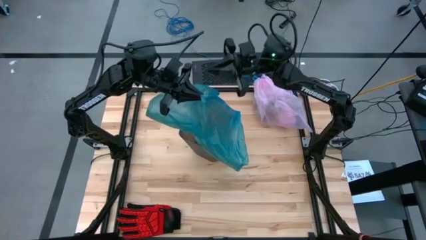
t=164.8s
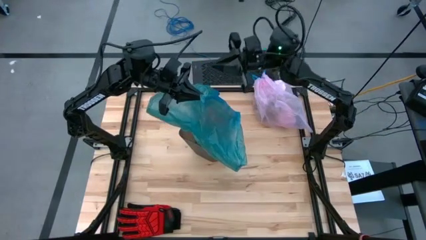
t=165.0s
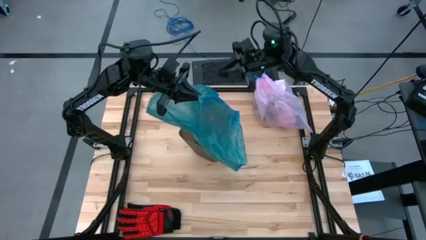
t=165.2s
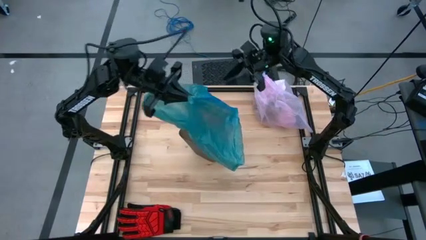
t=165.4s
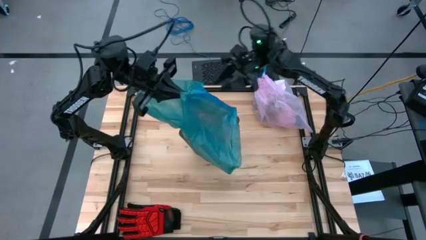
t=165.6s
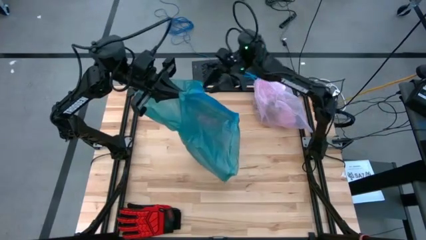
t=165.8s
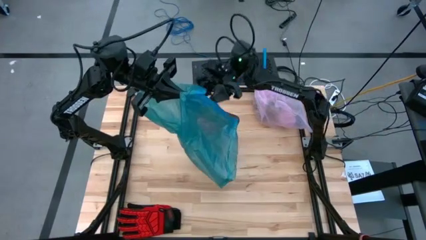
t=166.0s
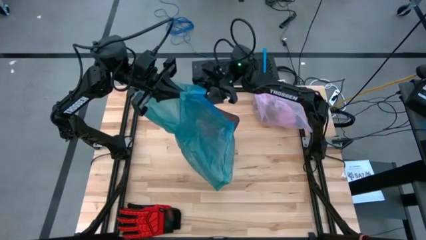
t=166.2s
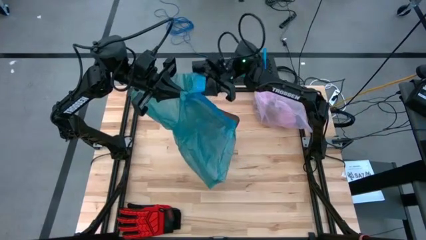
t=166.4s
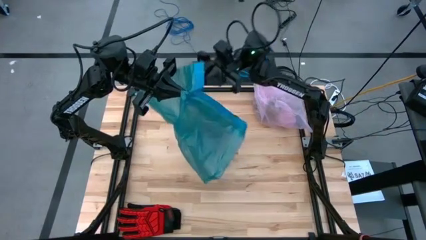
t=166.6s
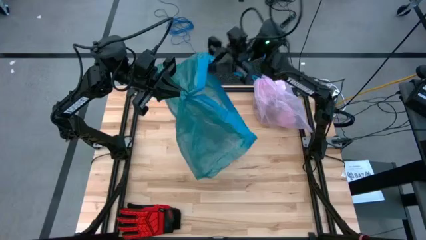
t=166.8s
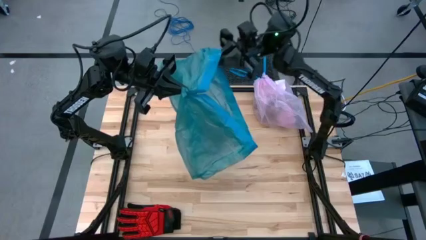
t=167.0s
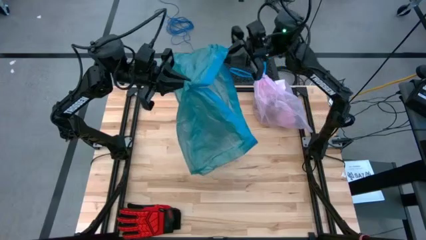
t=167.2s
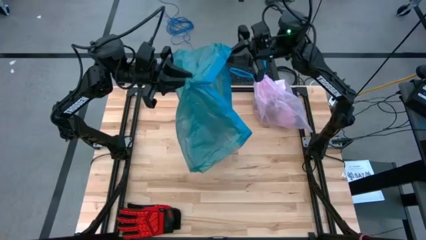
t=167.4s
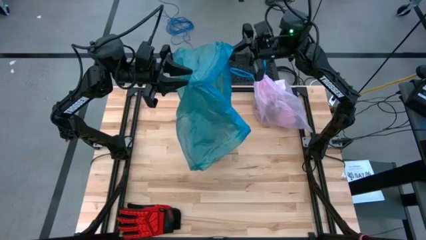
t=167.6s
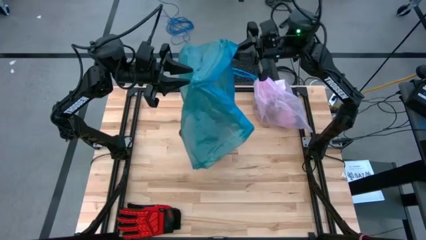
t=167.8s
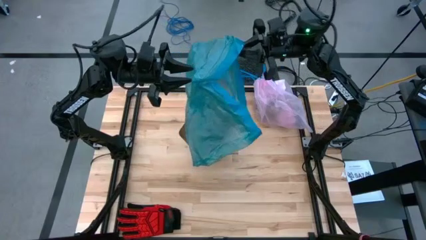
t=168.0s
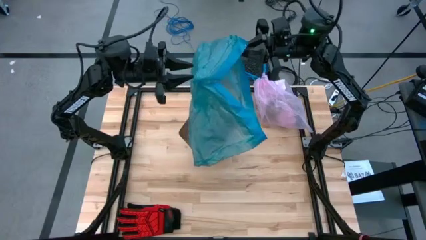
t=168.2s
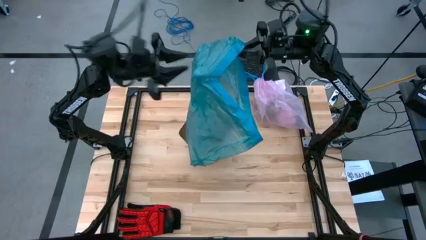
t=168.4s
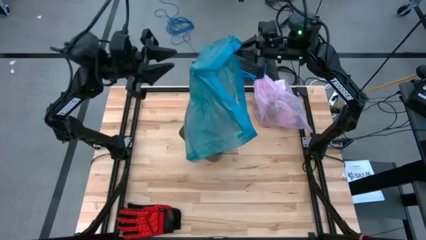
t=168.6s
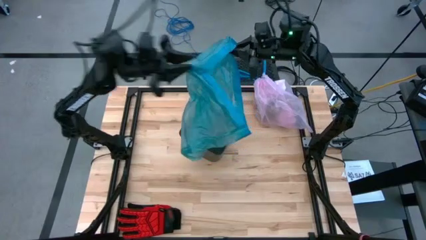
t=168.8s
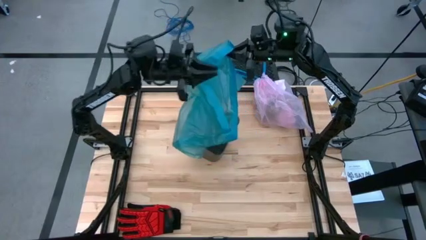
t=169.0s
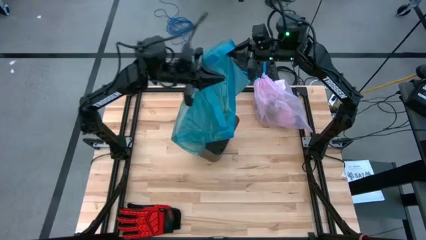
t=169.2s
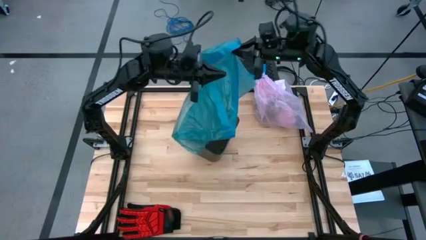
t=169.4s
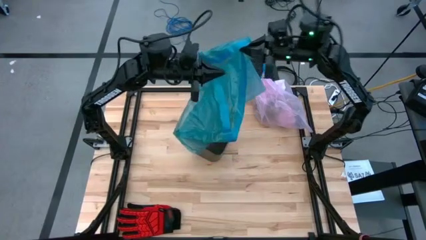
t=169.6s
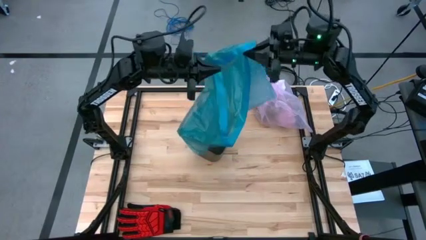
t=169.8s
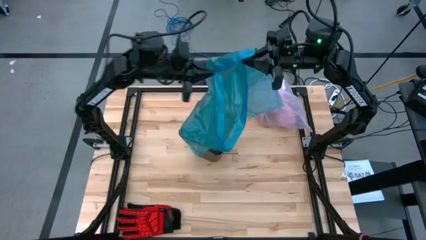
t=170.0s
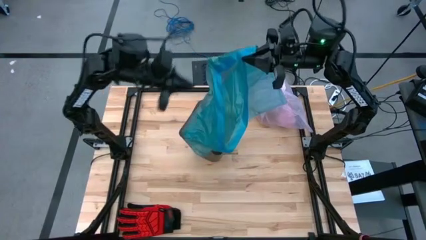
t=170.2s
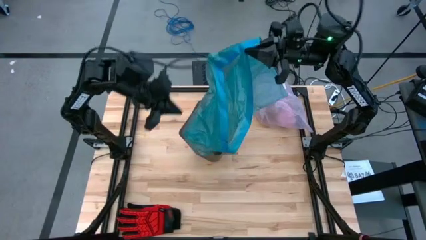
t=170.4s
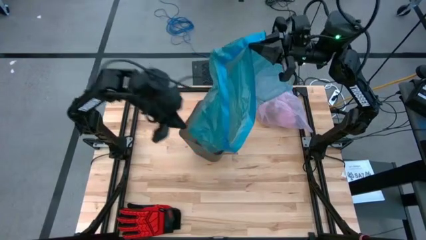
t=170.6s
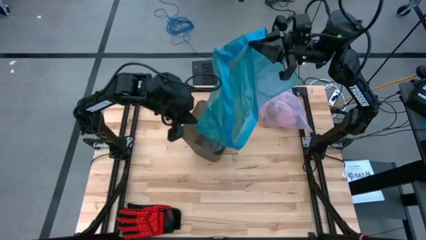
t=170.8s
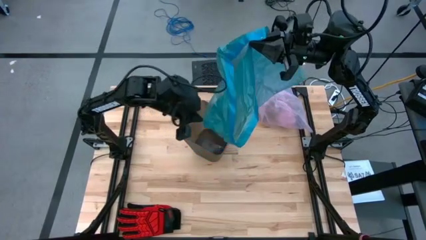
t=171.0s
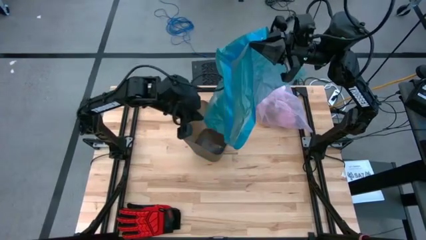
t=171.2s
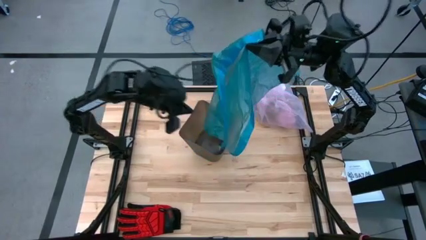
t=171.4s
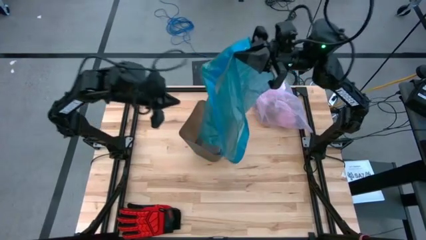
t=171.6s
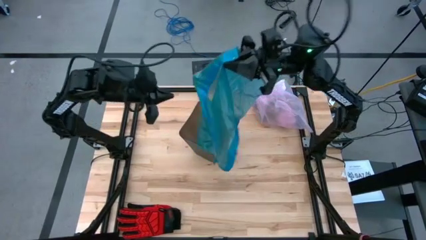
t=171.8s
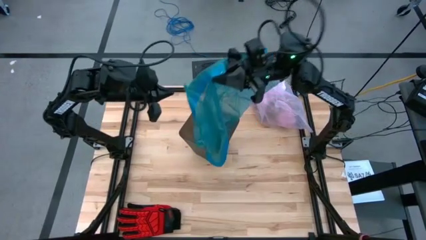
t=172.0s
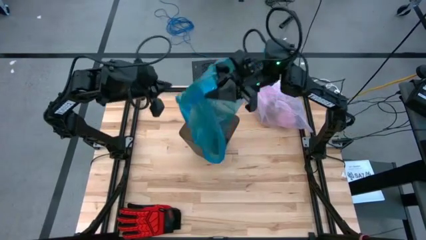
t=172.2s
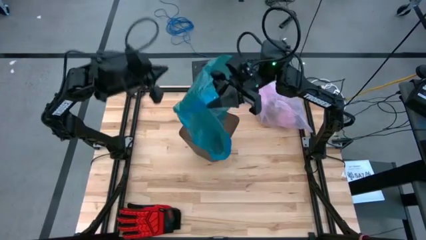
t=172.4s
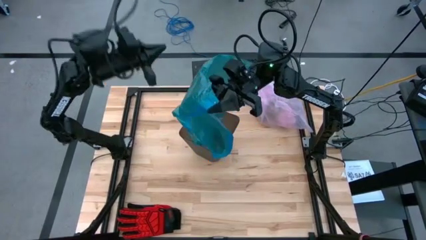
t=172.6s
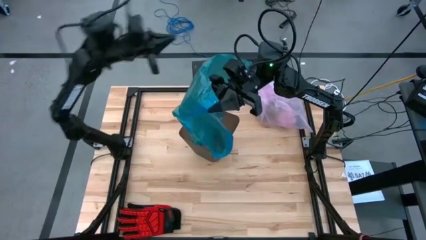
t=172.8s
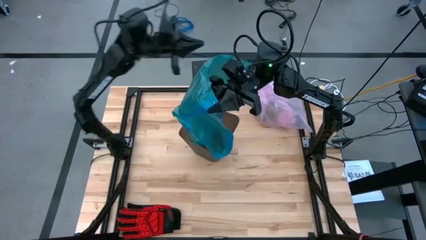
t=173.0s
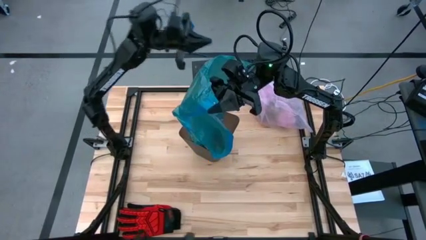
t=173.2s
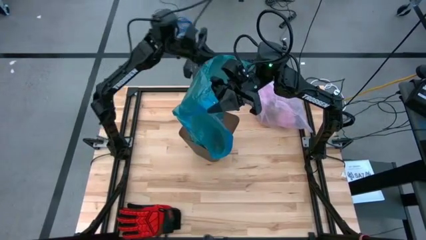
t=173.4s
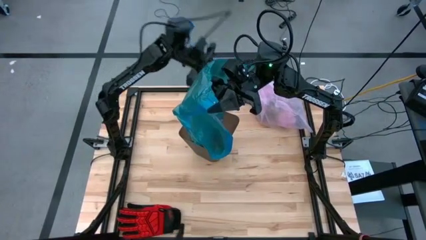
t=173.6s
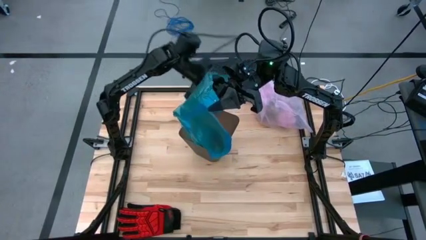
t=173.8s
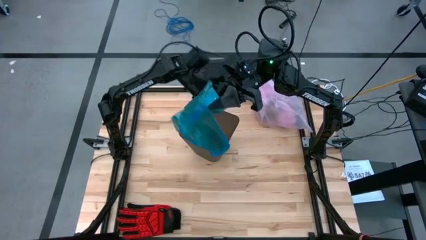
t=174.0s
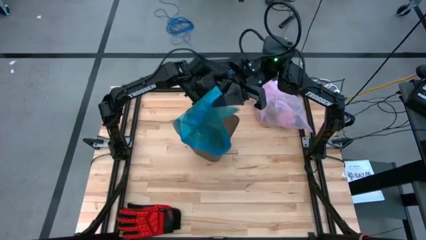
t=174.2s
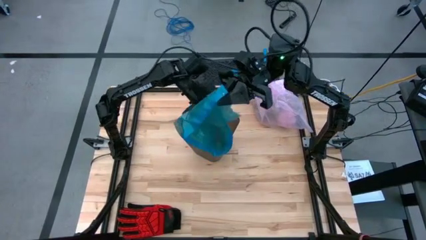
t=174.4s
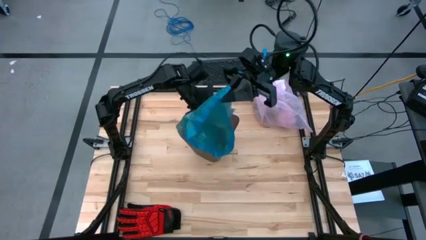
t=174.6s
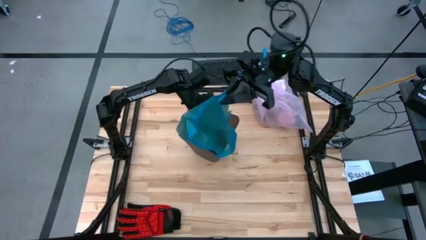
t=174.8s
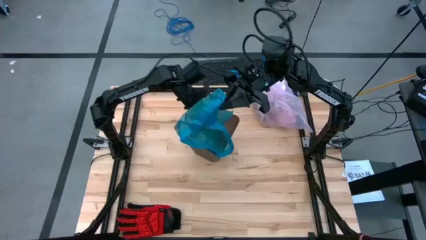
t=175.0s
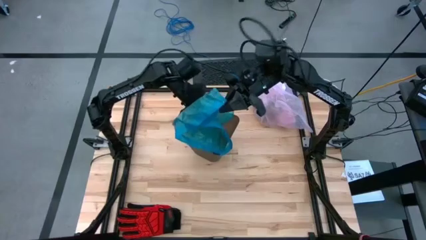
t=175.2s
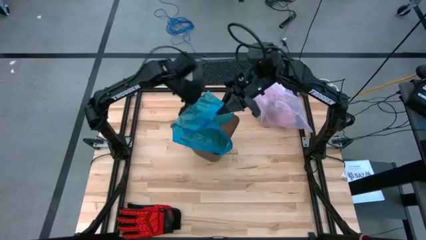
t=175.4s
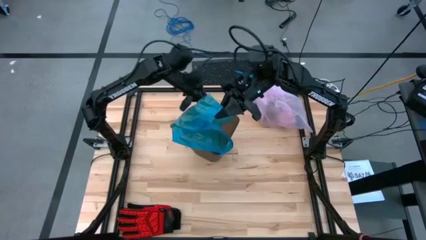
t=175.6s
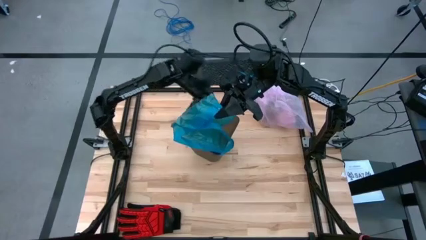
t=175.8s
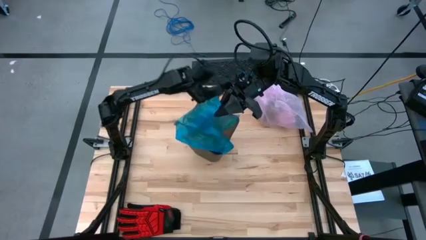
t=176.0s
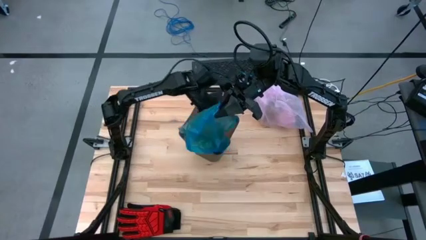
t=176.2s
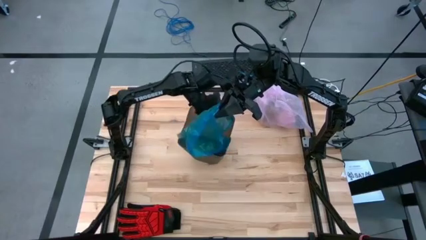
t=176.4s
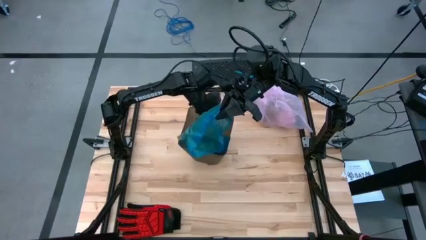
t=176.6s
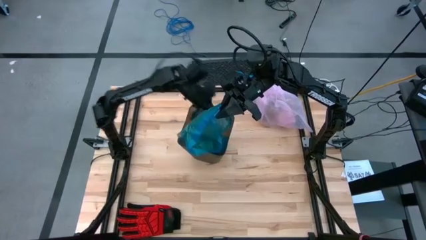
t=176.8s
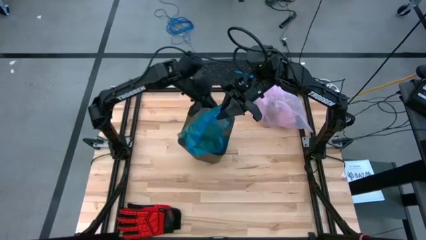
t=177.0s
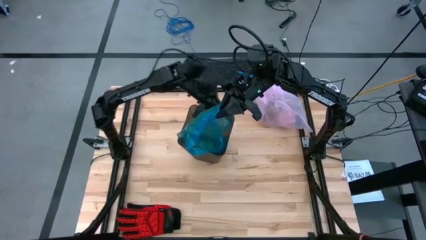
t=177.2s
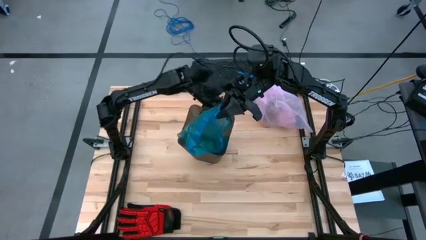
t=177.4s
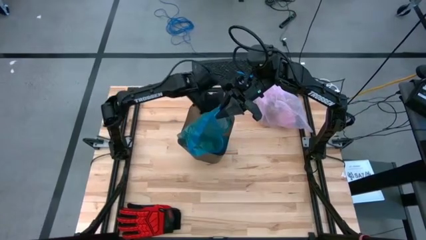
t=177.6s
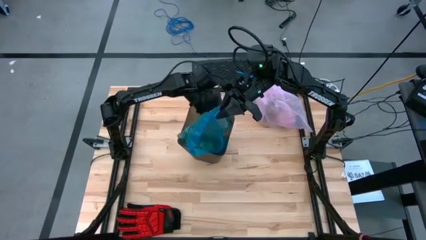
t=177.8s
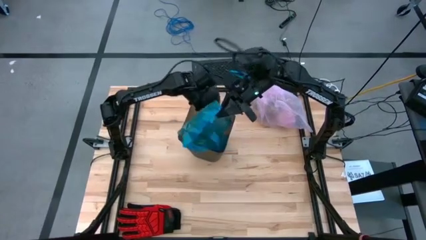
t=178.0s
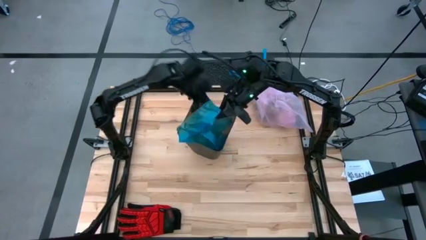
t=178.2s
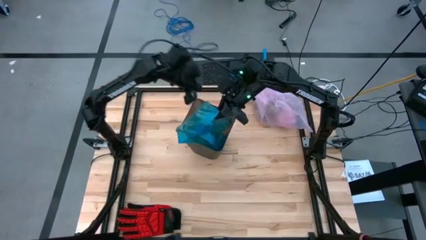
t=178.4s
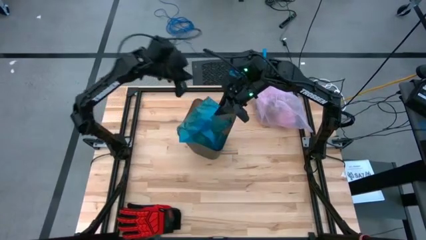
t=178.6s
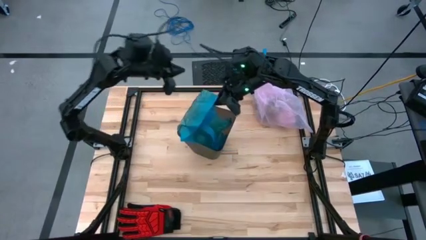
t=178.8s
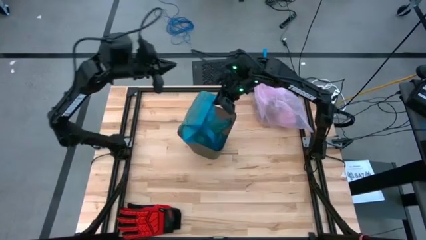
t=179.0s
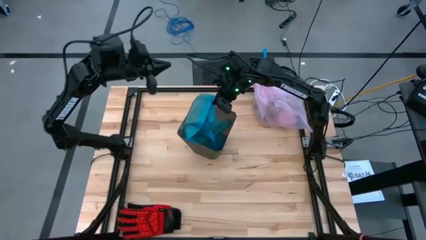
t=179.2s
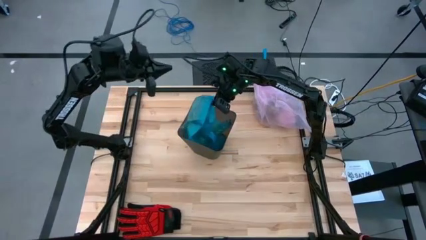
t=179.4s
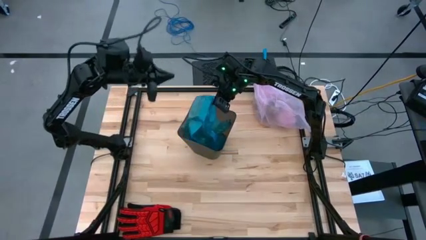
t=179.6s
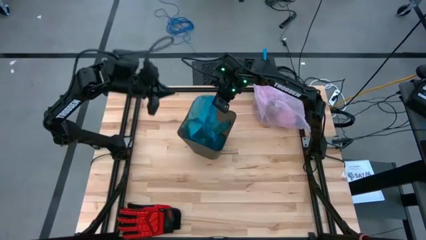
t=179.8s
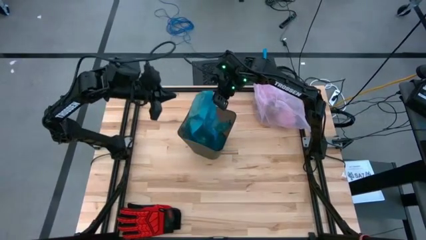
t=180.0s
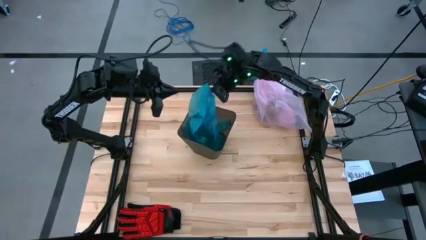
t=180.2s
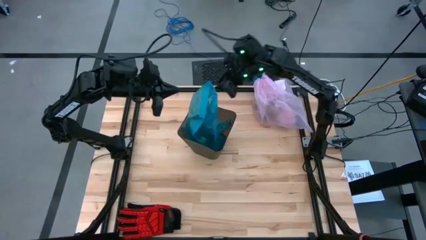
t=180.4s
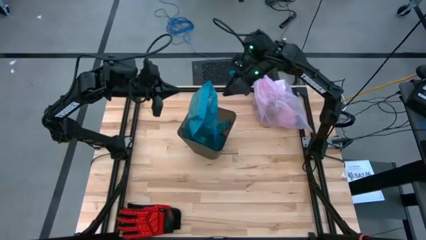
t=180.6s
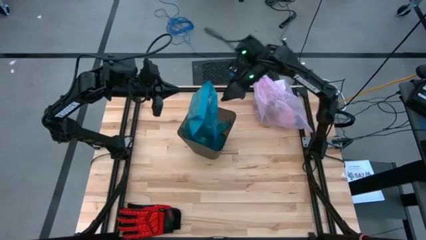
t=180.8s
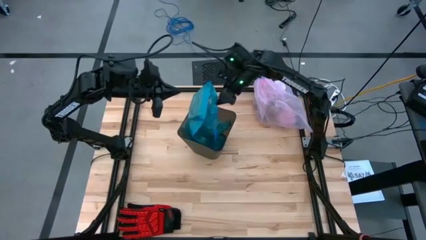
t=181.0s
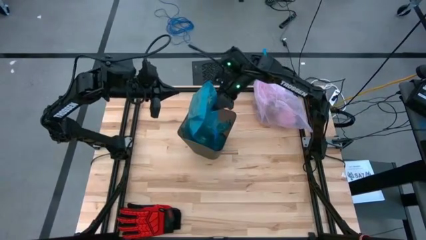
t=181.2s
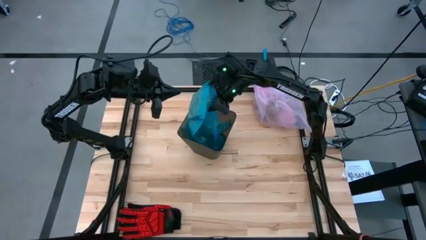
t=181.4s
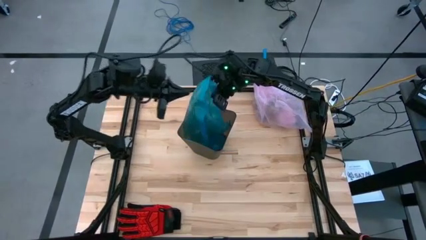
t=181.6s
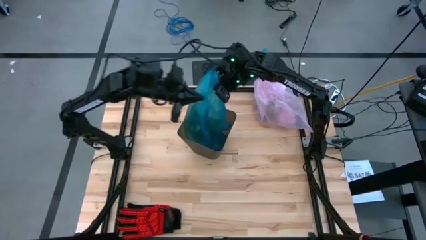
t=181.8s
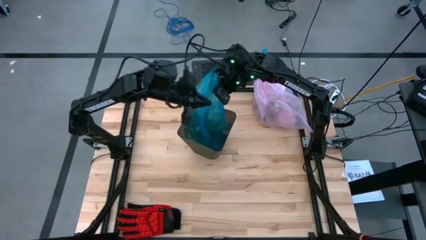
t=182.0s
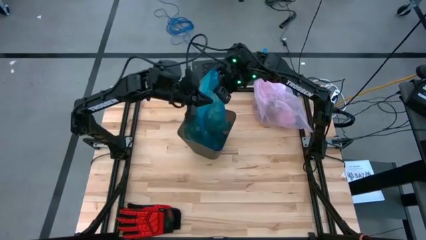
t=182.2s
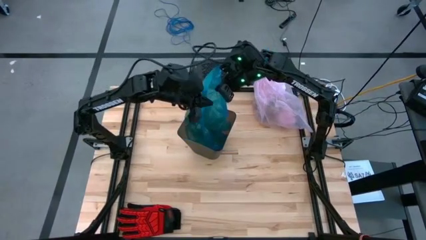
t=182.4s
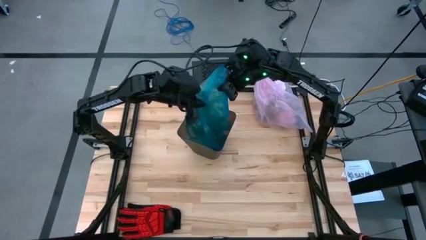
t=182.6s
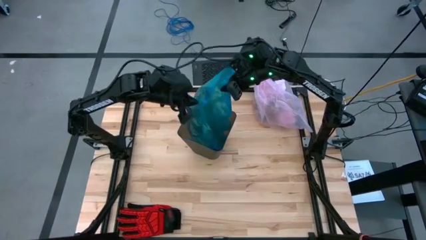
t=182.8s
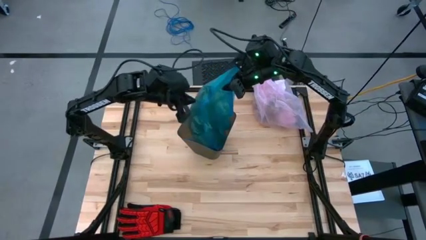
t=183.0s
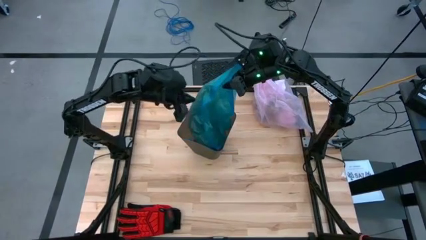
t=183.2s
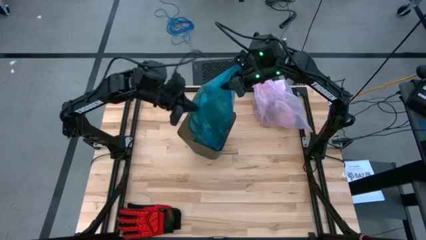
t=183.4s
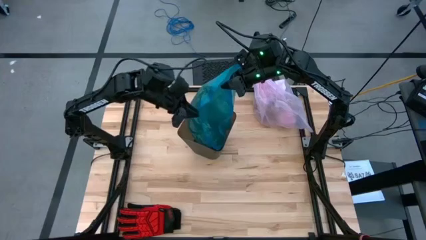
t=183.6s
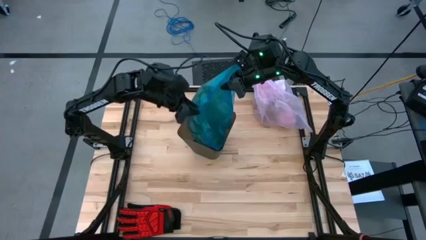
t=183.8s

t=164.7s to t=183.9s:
Task: place trash/remove bag and relplace
Insert the blue trash bag into the black trash bin
